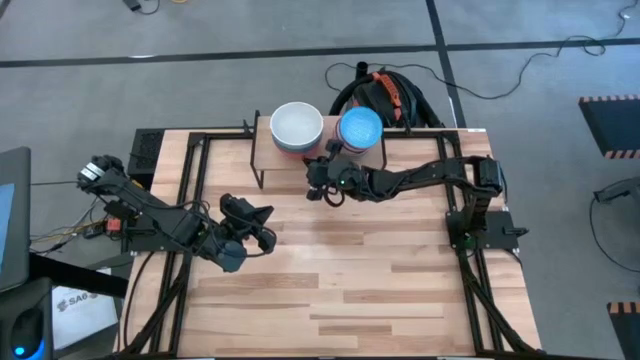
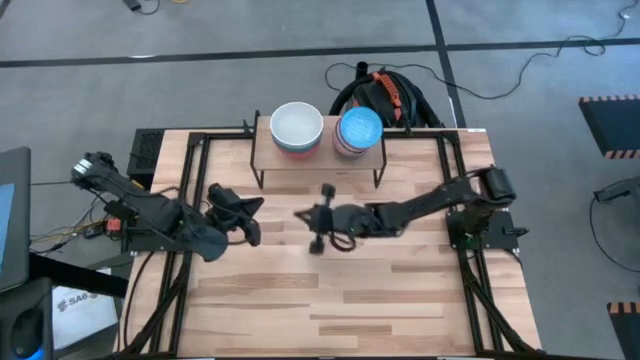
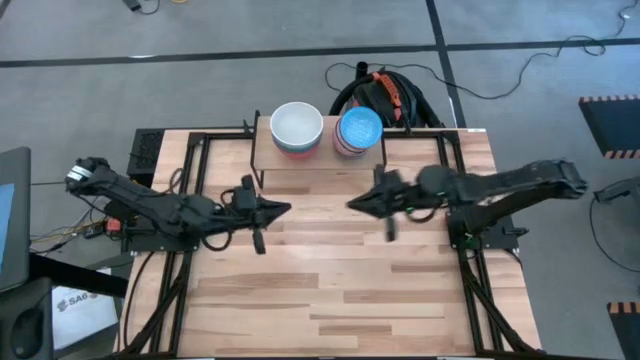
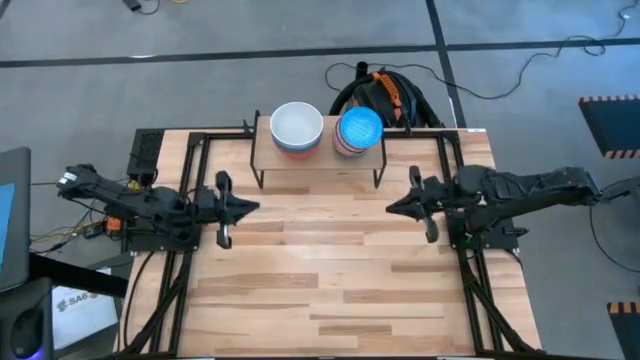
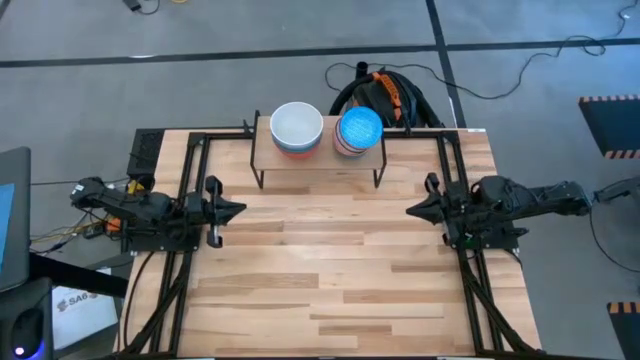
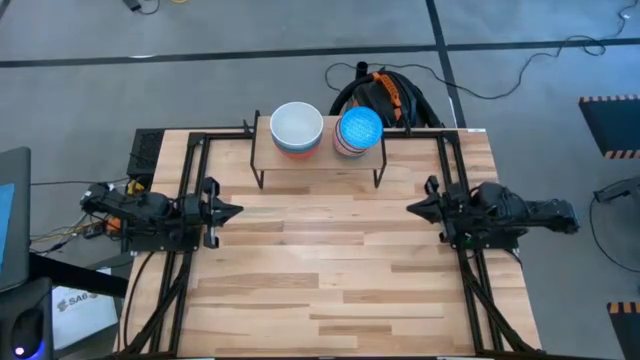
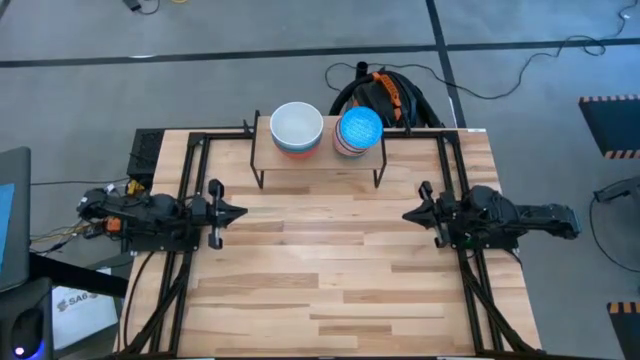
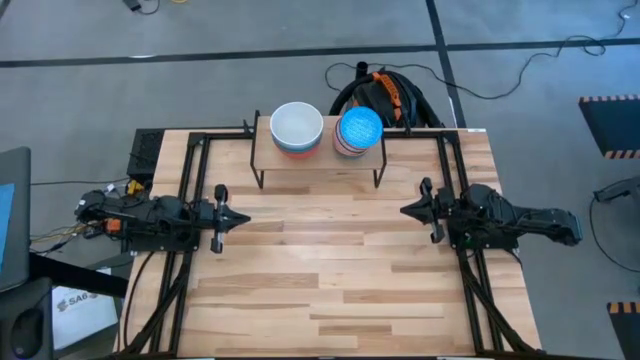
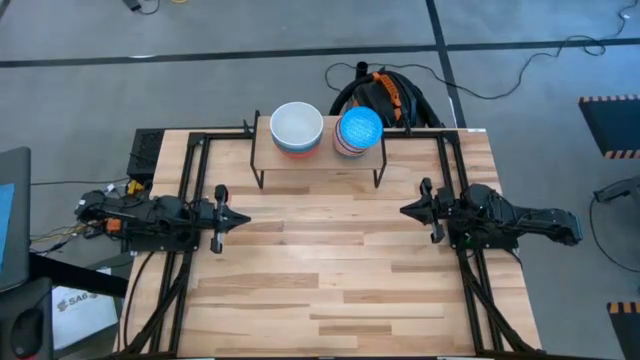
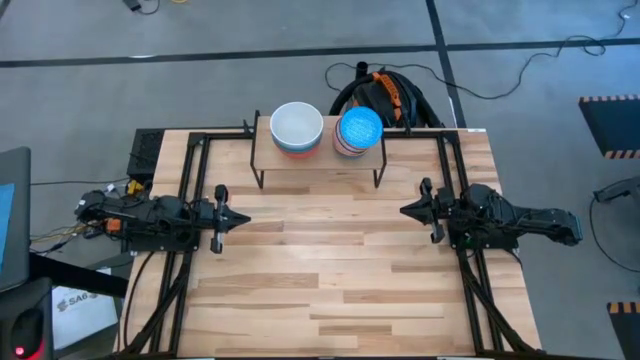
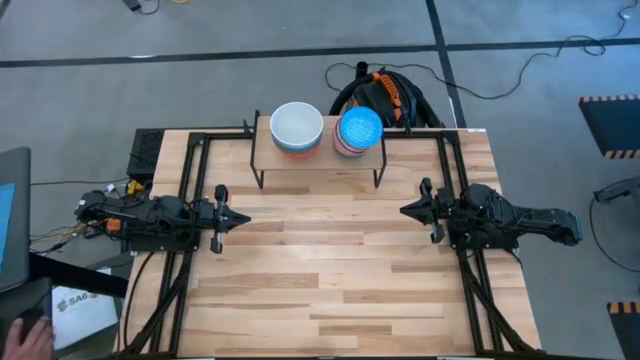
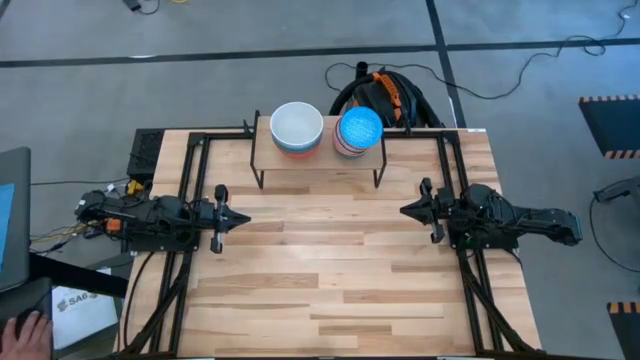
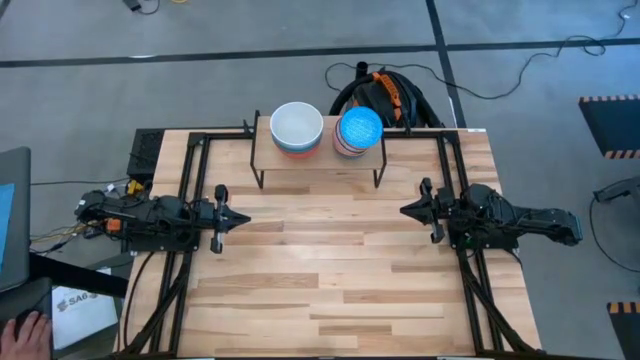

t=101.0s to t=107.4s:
Task: Place and stack bowls onto a shelf
Return to Home Position

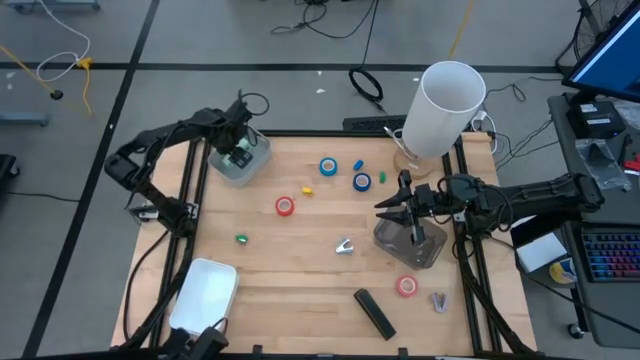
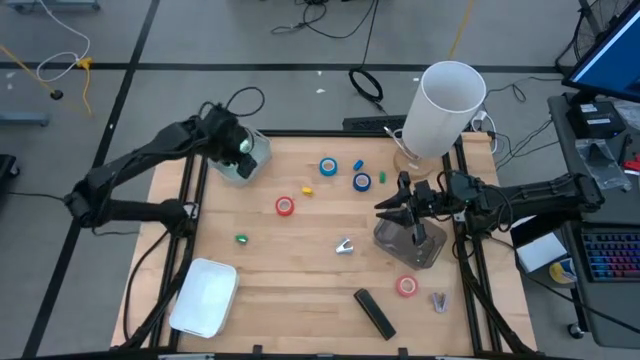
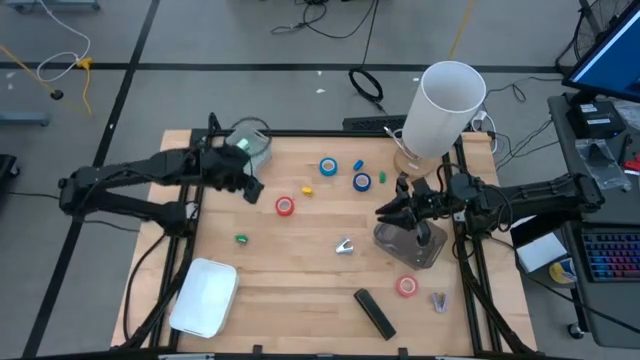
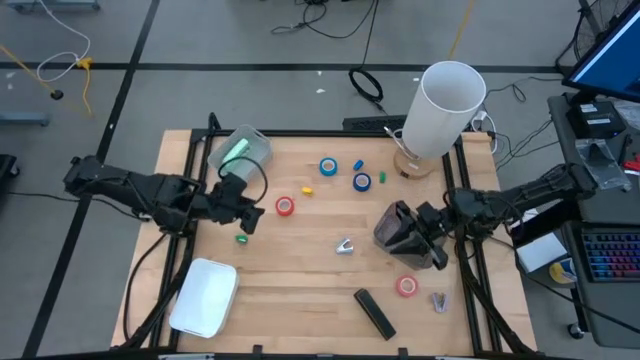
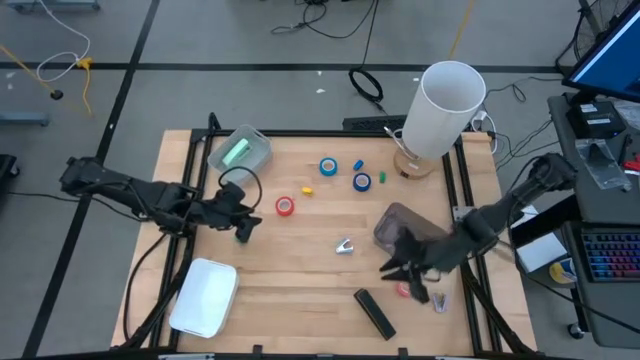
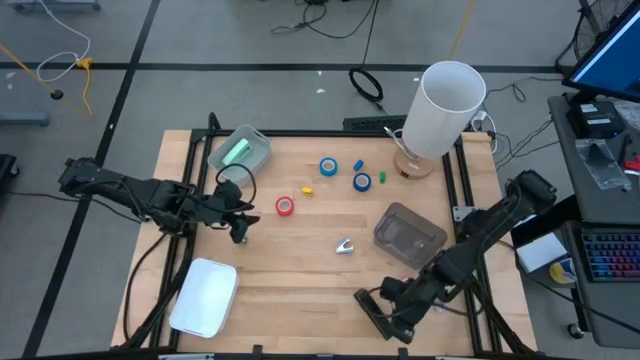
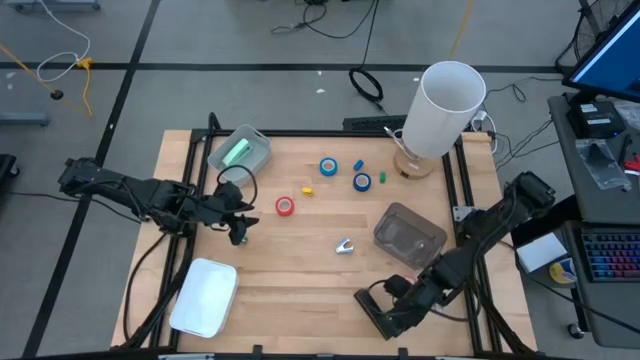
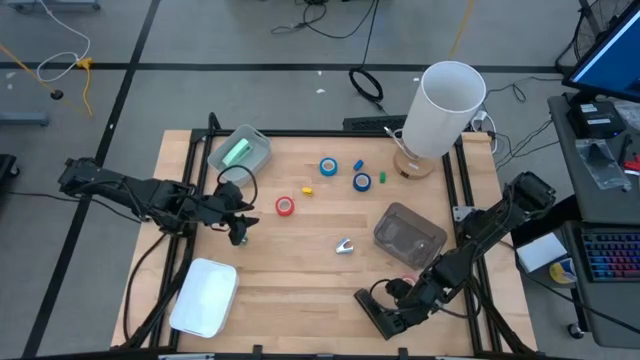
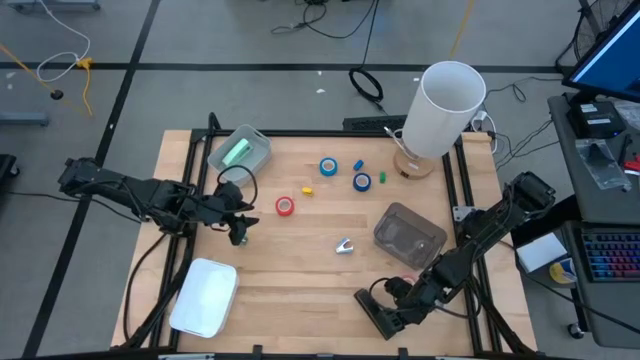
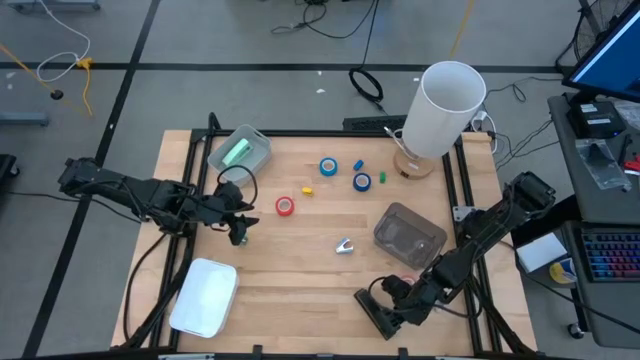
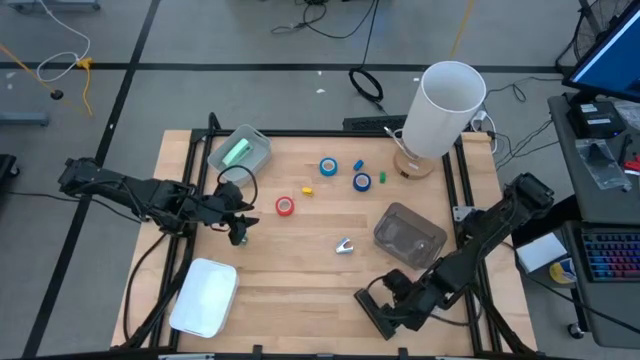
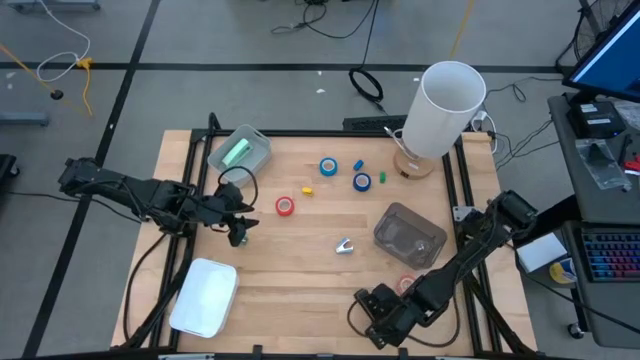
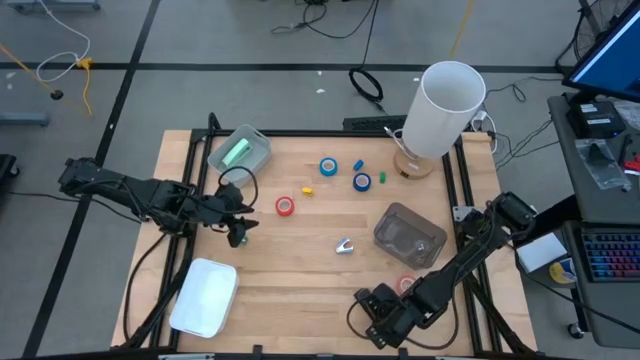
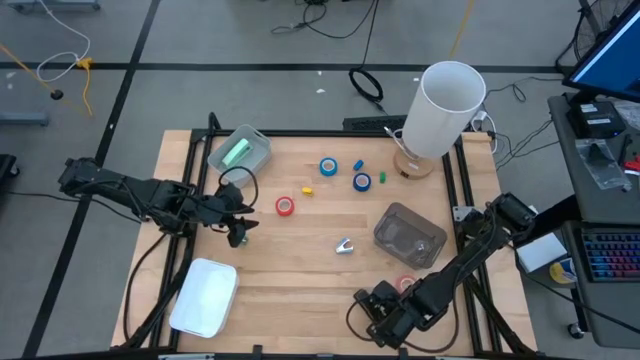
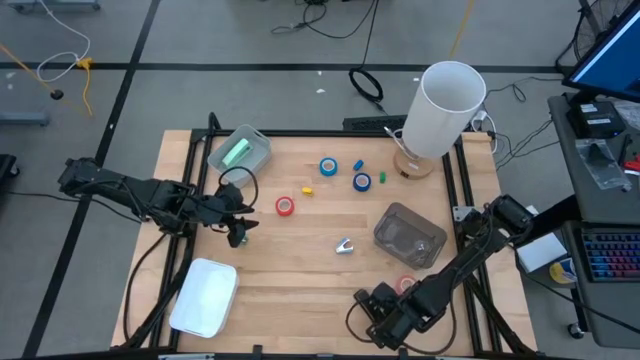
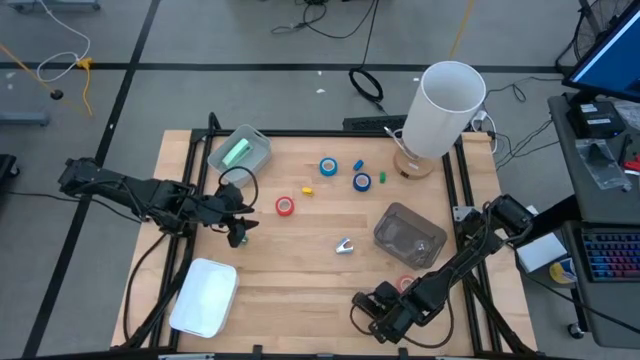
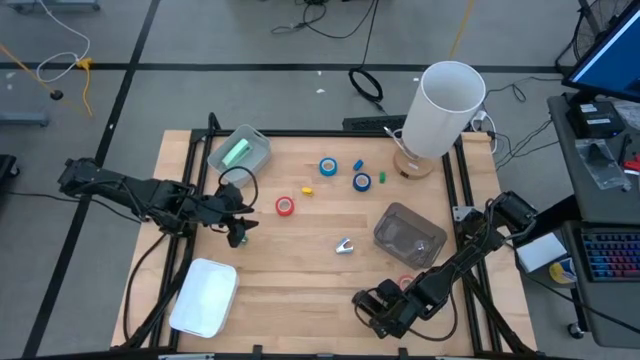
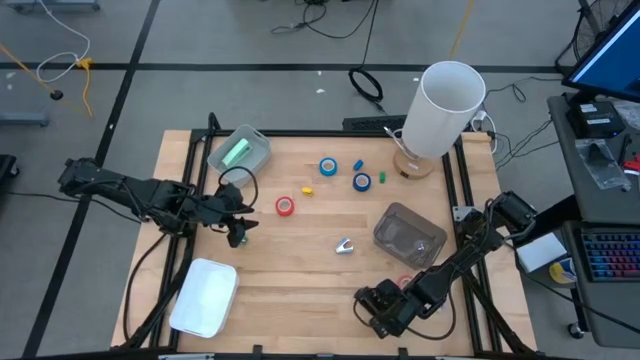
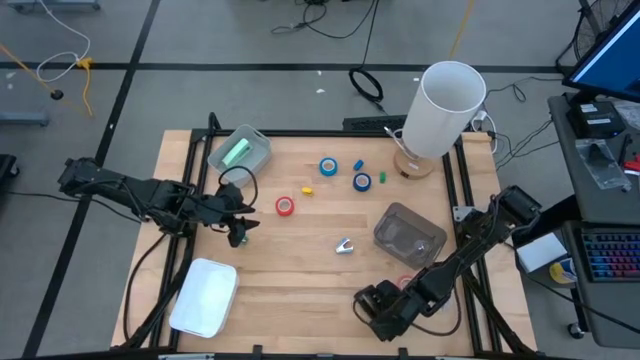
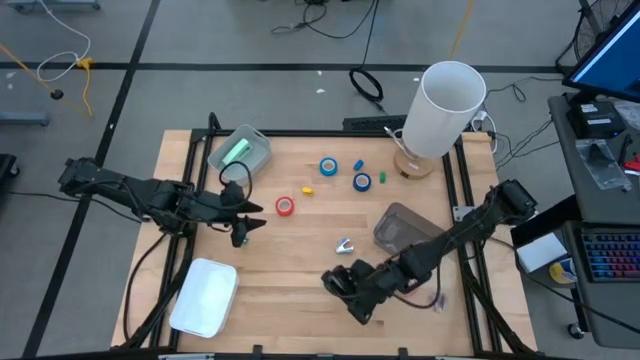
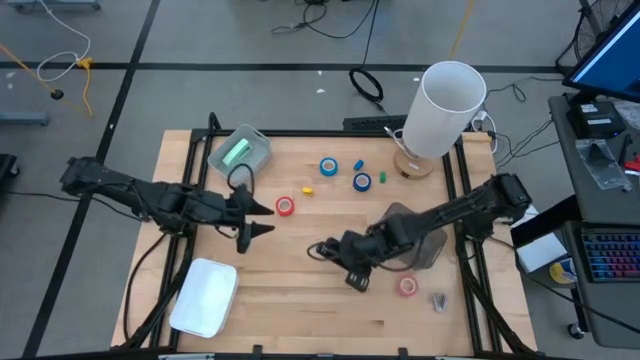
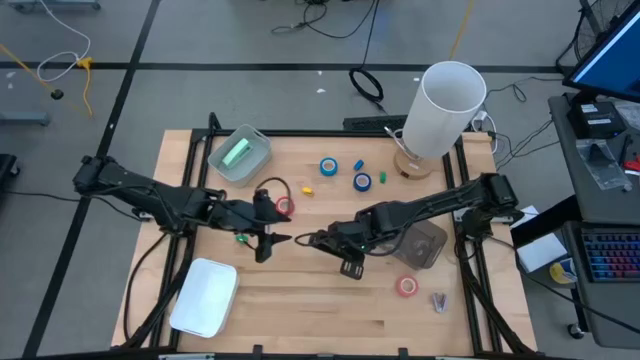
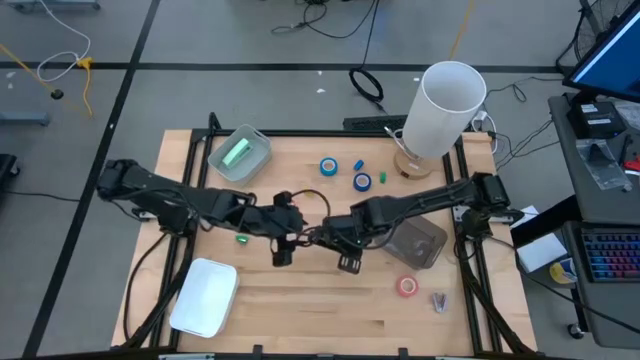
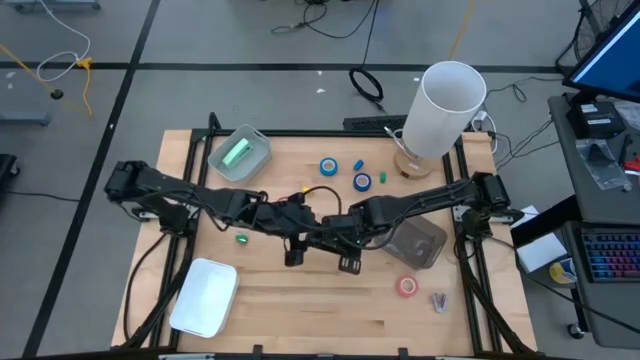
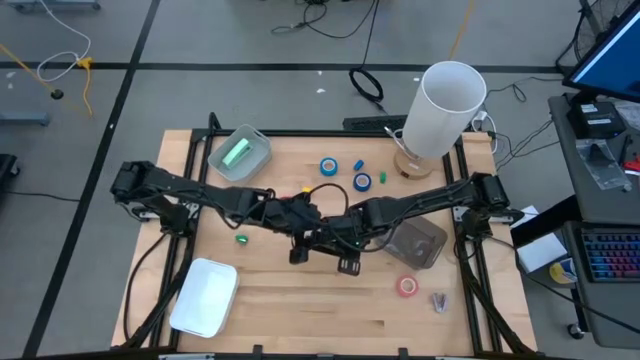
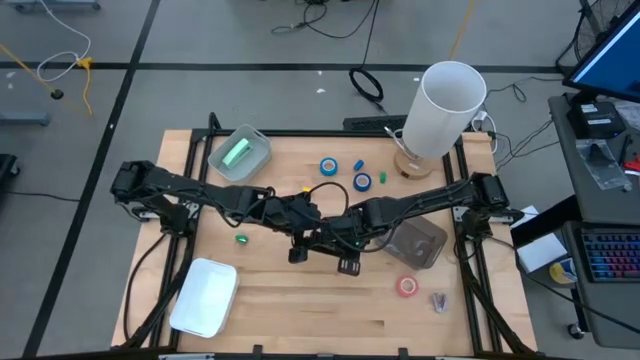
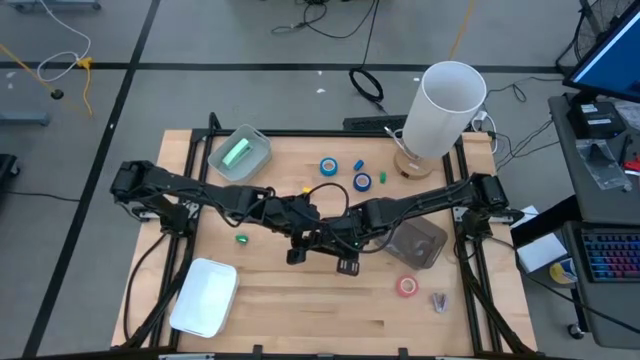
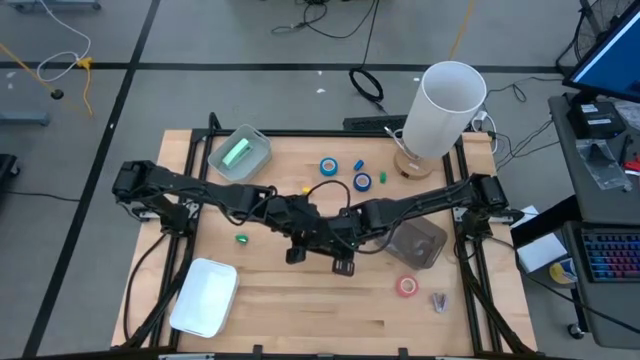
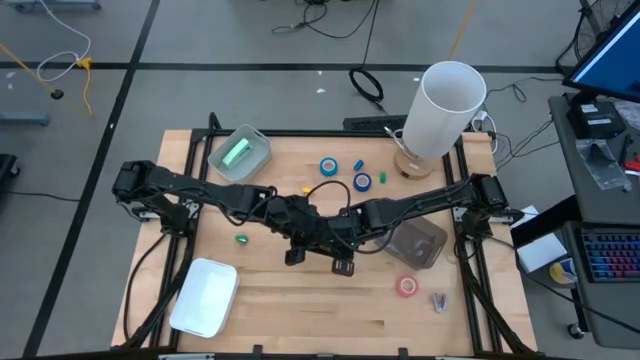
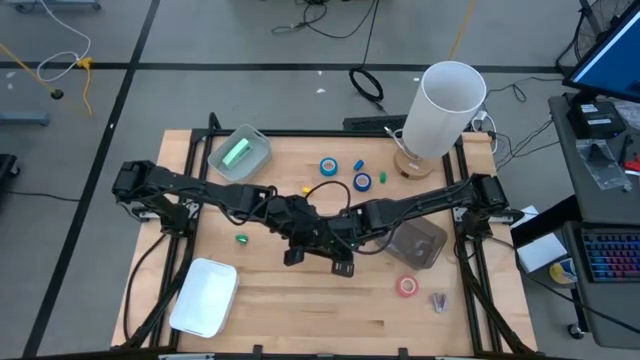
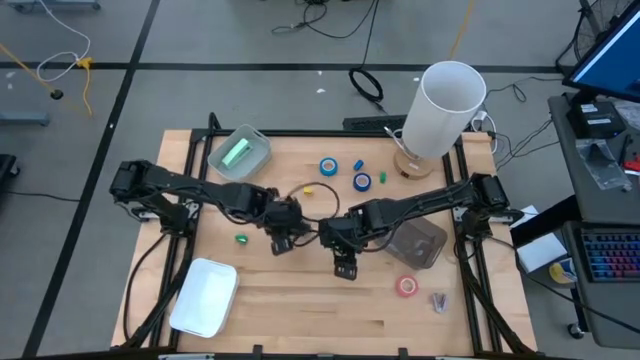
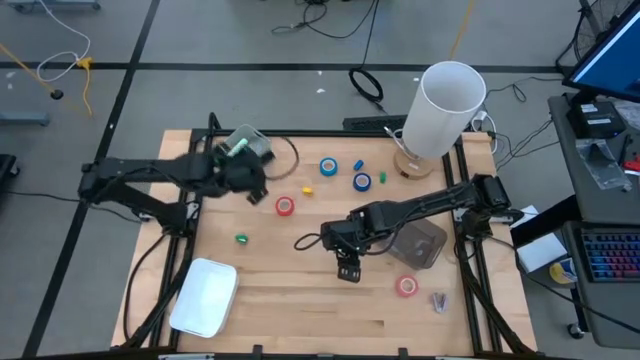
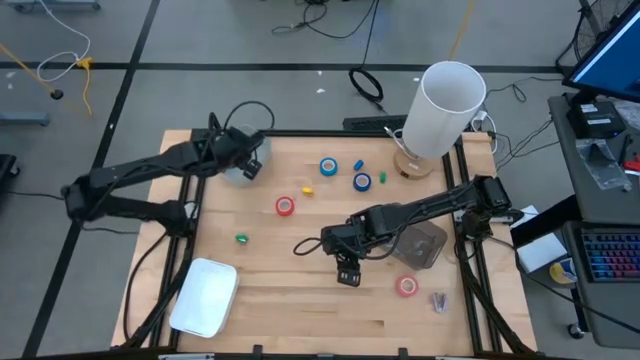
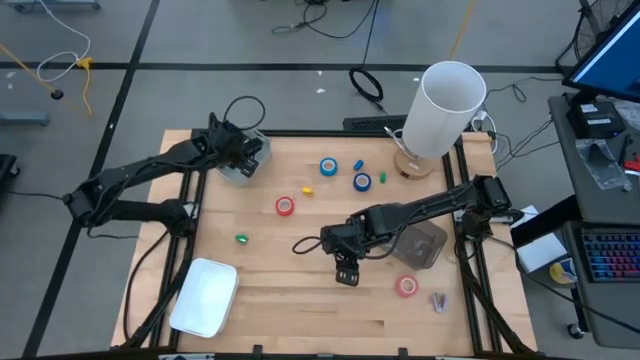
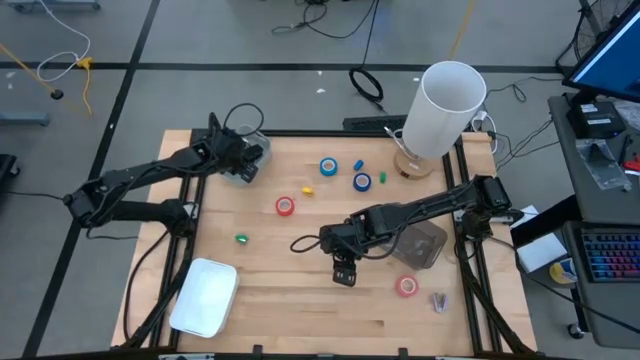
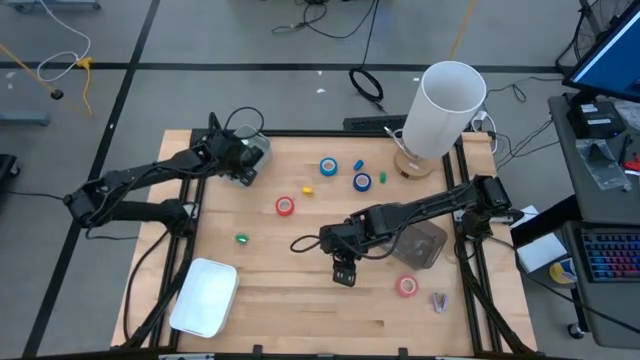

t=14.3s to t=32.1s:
Task: Pick and place Stapler, Stapler remover, tape
Put the large black stapler into the gray bin
